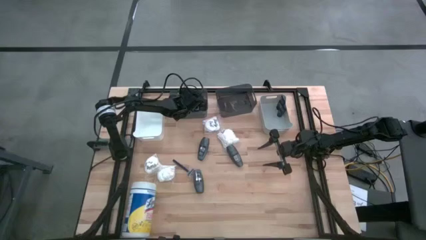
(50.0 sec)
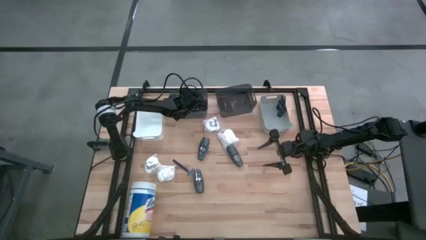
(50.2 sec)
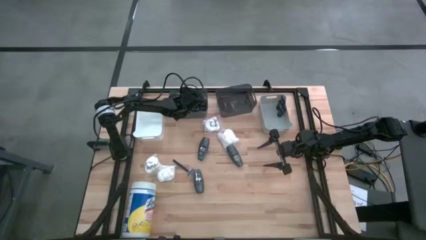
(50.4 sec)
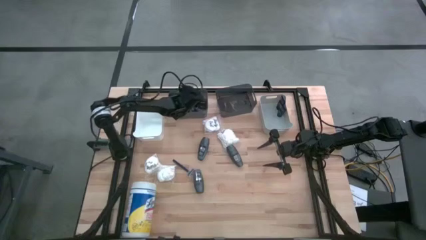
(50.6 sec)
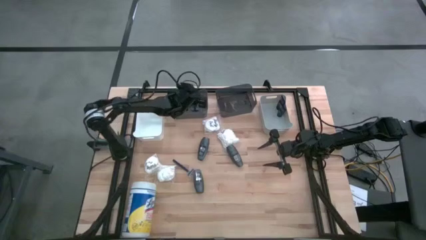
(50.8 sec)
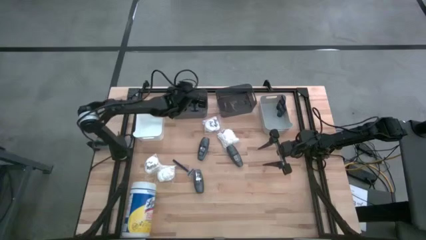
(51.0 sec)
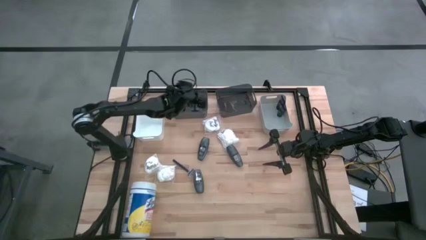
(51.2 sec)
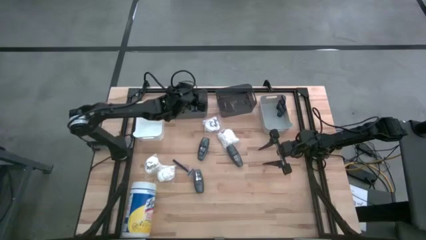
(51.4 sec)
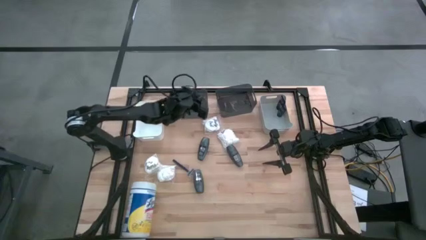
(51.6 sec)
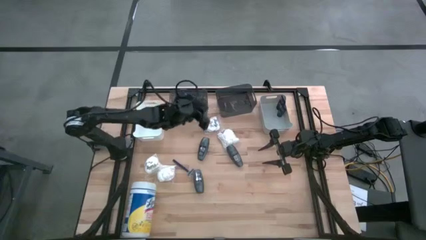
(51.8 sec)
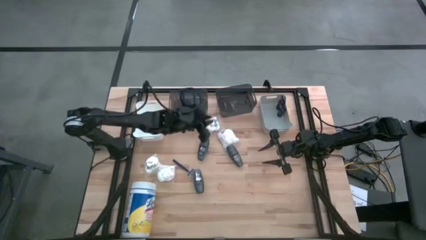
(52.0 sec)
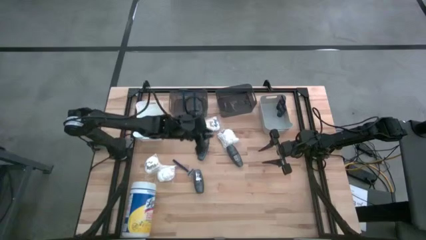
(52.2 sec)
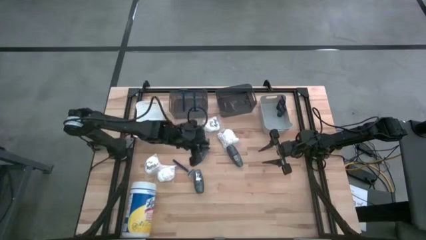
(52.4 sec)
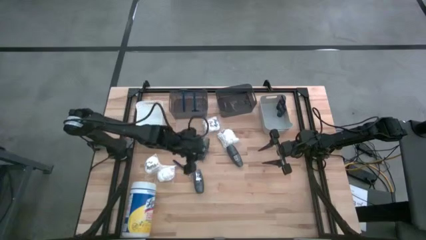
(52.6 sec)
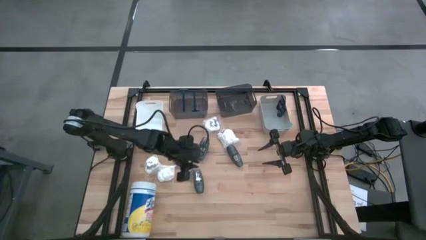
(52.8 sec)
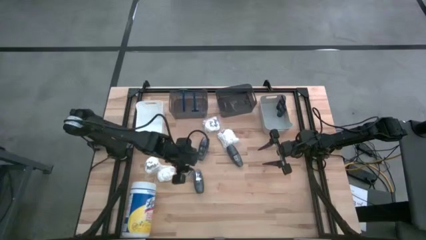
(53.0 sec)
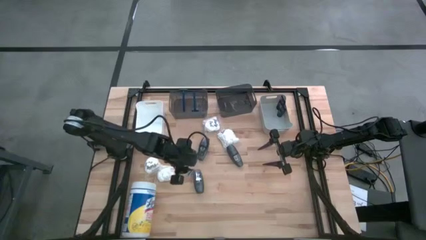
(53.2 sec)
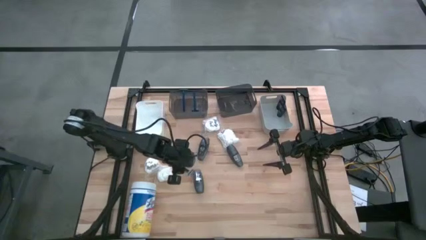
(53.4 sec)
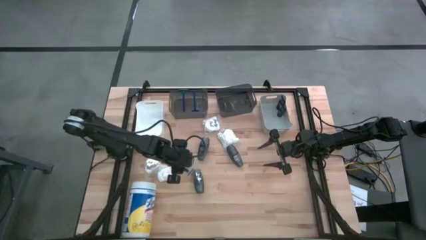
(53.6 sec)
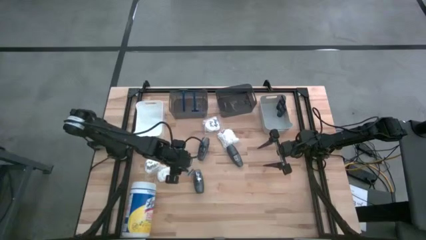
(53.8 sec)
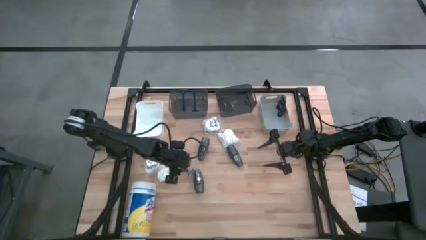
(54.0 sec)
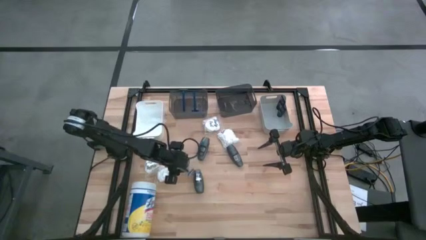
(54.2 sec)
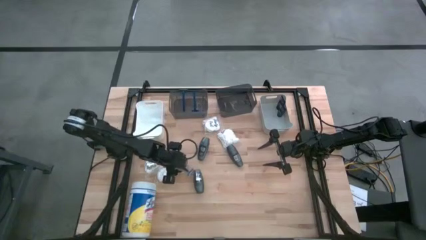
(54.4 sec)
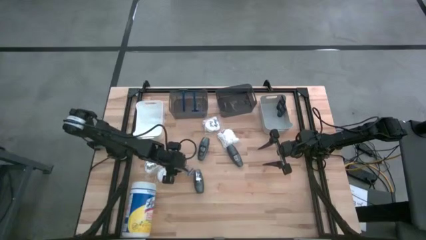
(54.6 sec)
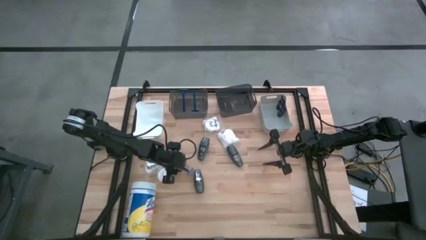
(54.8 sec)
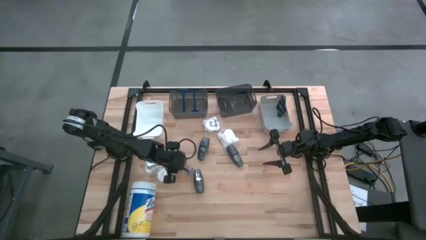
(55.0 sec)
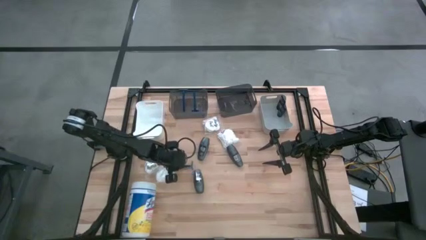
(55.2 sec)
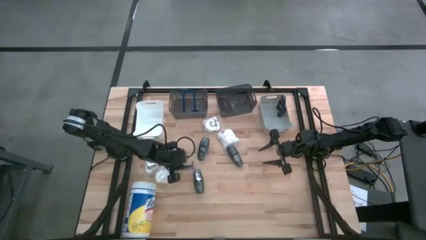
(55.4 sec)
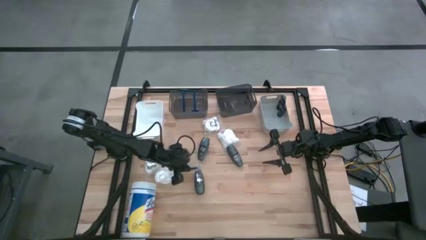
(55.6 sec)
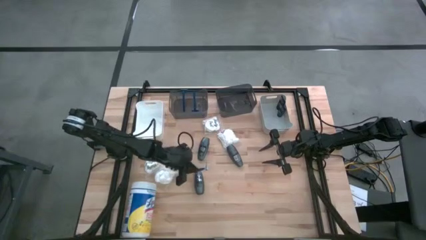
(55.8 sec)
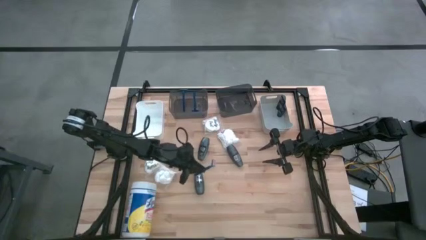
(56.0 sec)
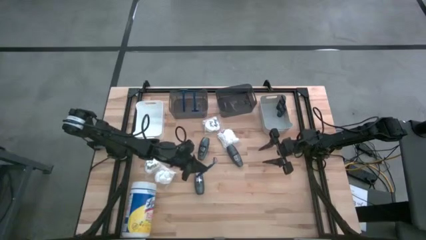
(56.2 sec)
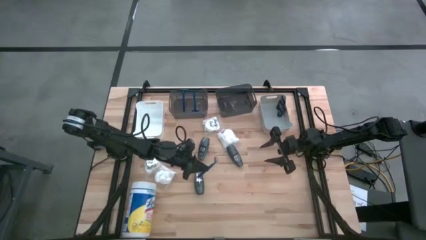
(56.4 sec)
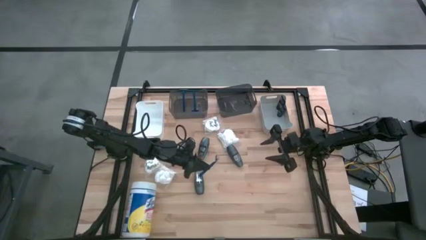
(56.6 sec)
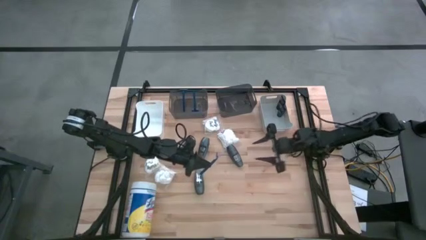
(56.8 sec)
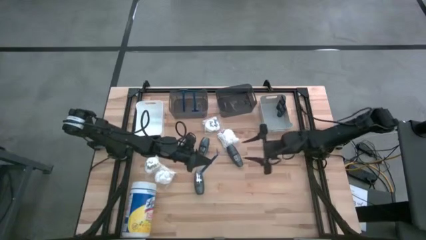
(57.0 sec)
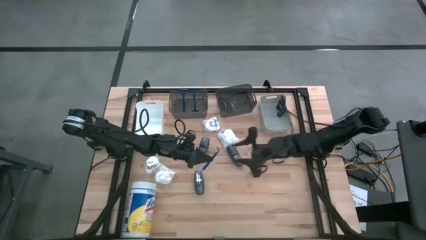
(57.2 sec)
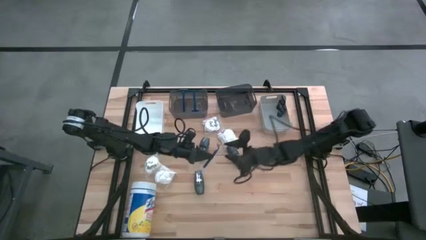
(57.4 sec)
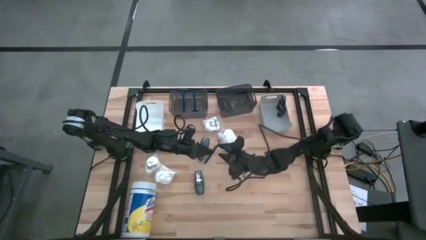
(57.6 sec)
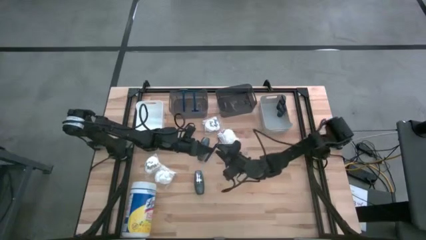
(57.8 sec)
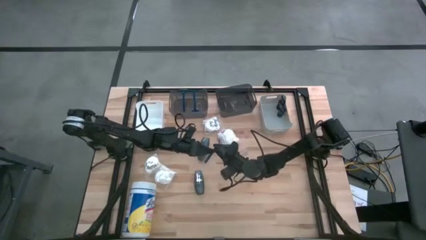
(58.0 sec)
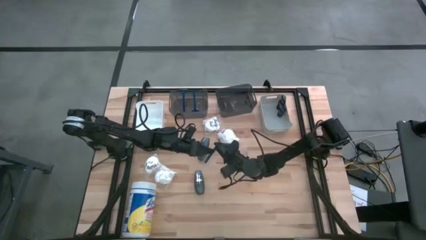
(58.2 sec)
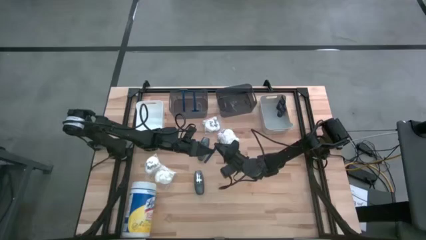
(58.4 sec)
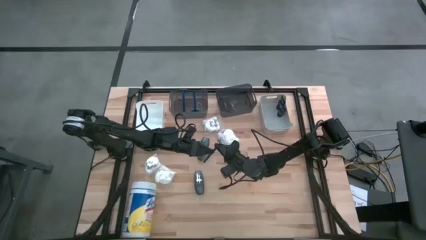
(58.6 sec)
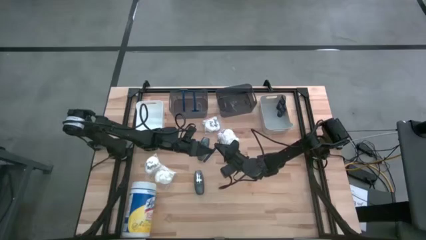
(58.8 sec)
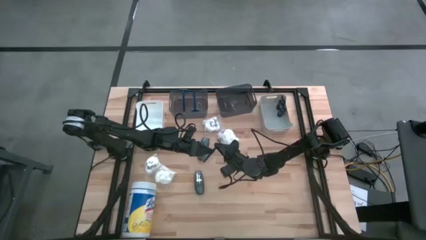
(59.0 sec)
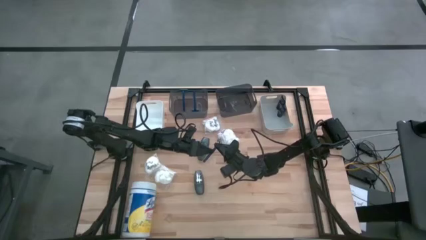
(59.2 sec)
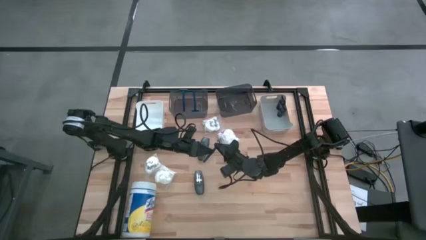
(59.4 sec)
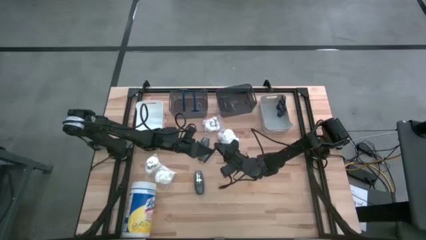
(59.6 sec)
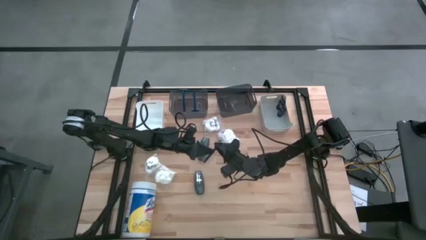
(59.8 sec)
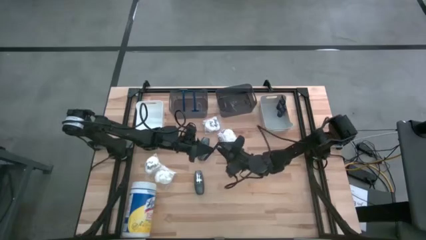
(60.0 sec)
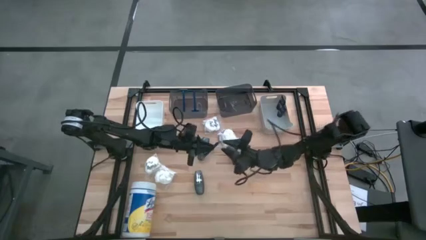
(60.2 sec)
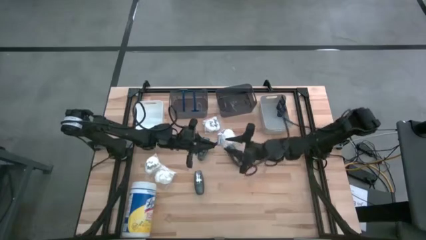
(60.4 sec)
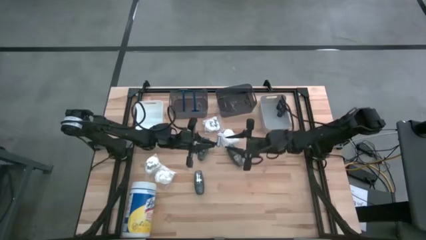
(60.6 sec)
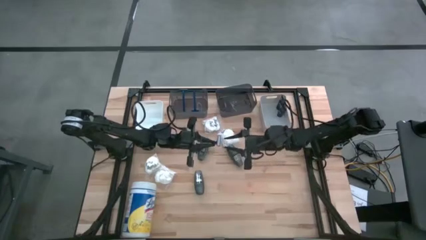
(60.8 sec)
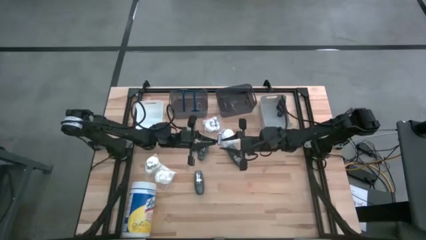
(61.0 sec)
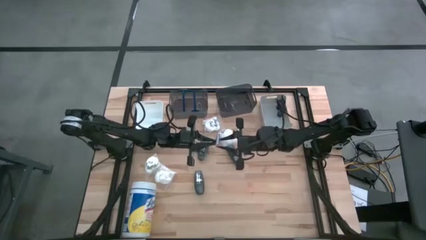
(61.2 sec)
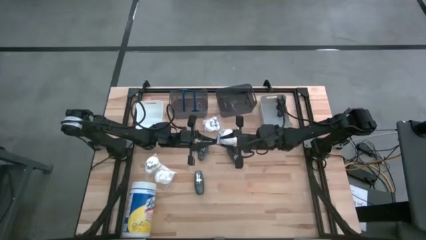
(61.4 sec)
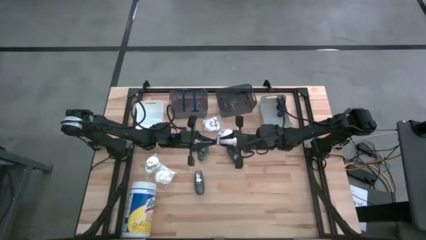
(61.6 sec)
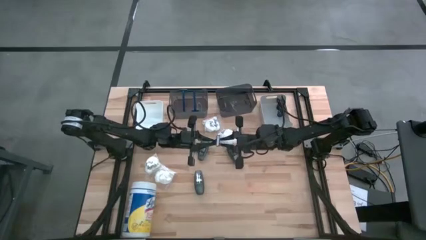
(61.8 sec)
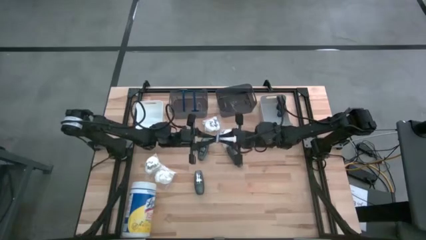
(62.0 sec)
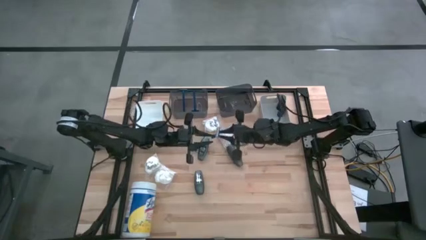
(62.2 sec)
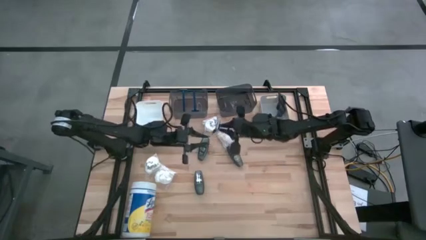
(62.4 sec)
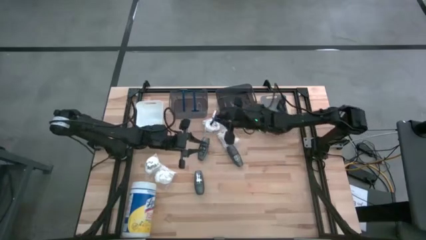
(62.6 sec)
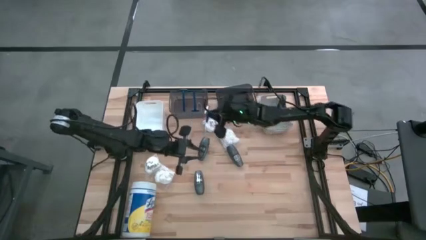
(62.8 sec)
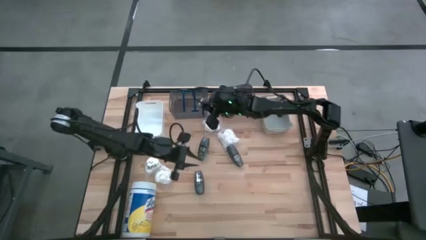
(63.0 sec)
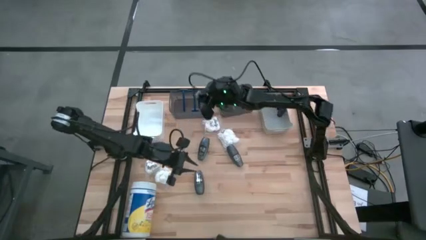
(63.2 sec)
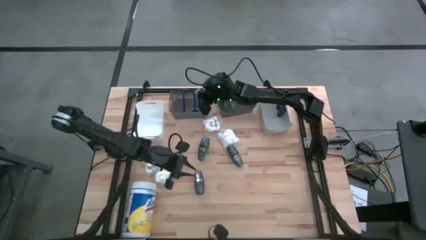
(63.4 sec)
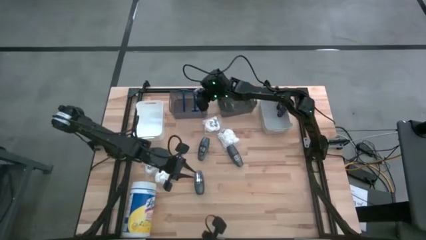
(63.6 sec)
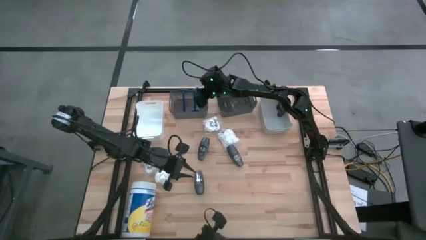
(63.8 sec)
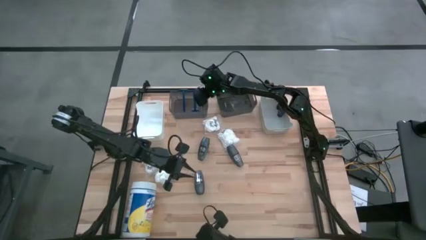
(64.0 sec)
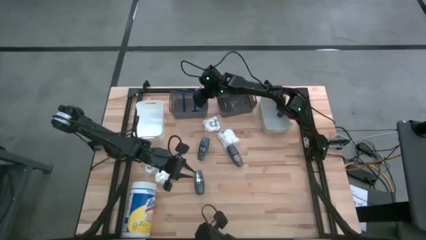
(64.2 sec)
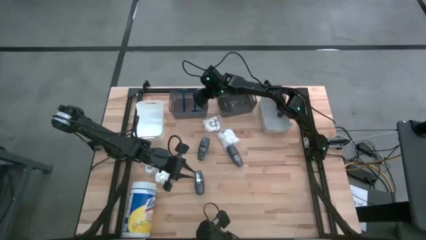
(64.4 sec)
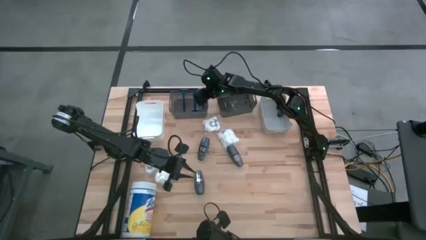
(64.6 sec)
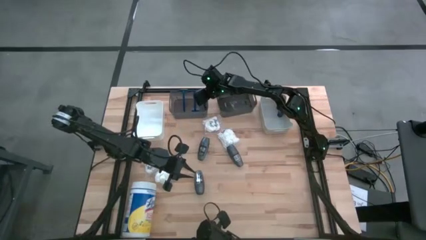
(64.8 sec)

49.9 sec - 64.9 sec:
Task: Pick & Place Travel size toiletries
Put the blue razor into the left black bin
